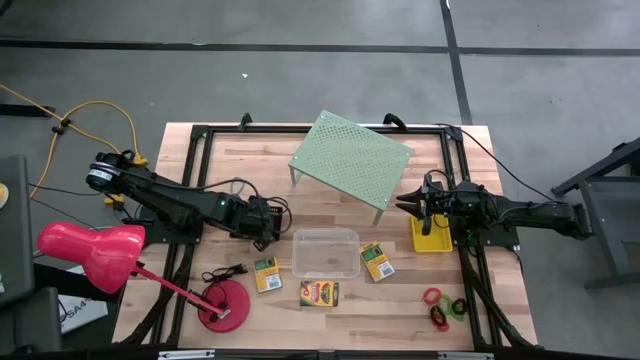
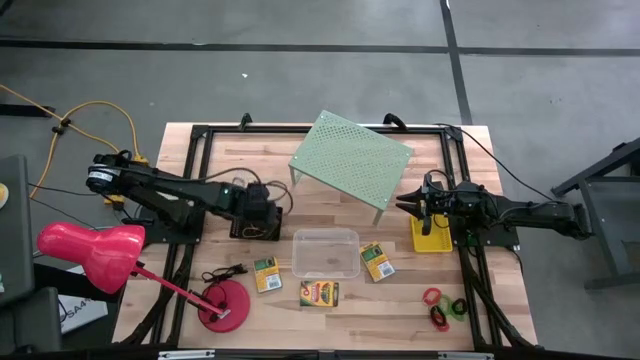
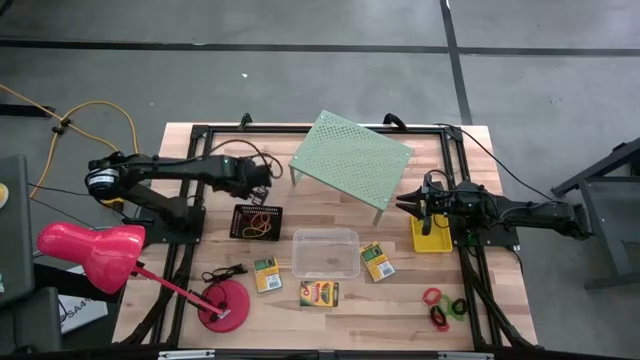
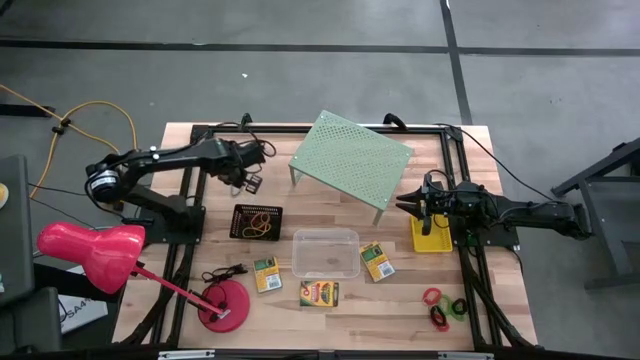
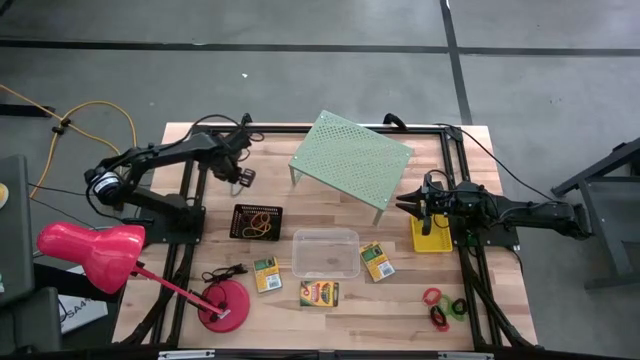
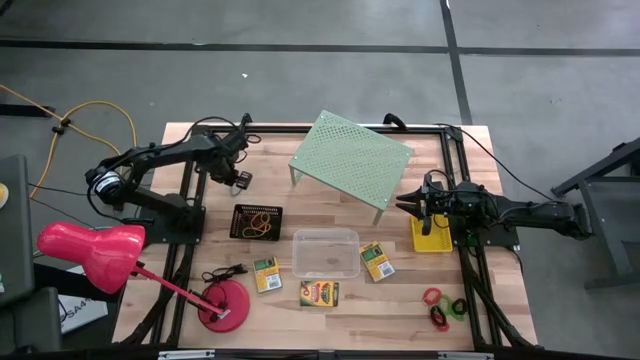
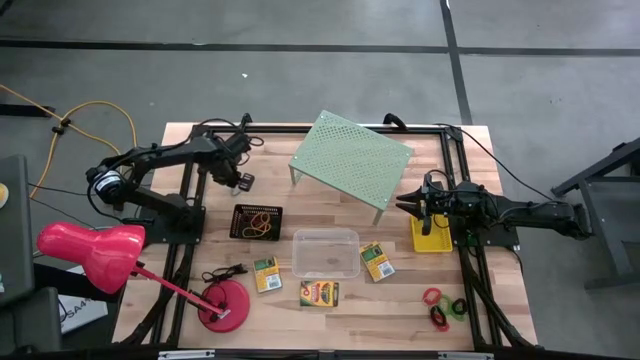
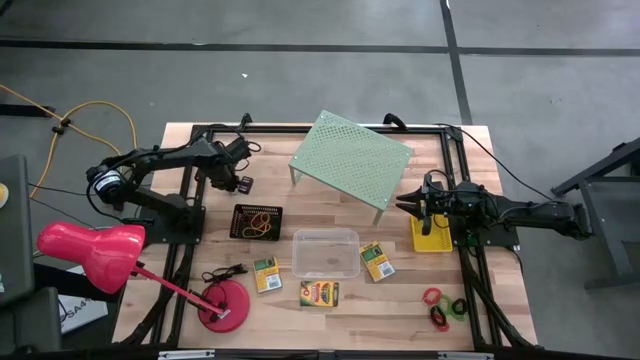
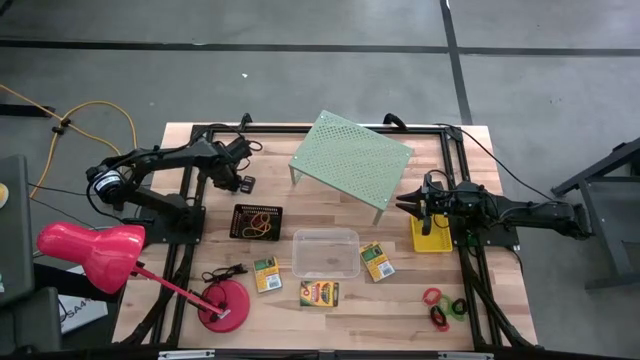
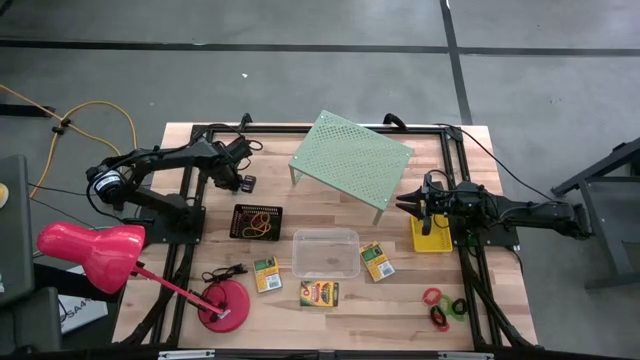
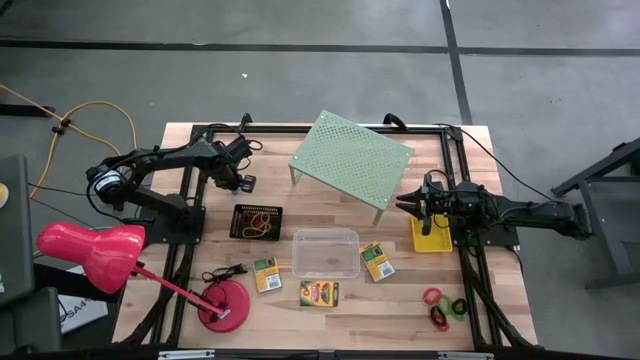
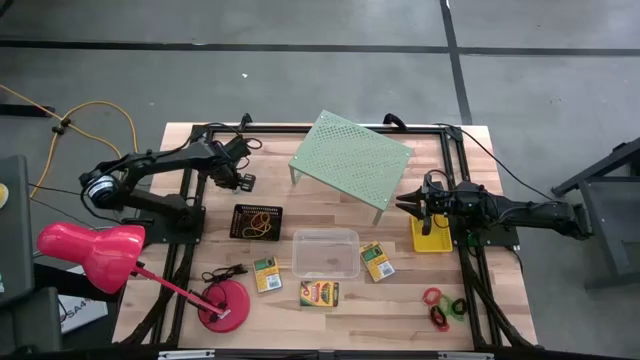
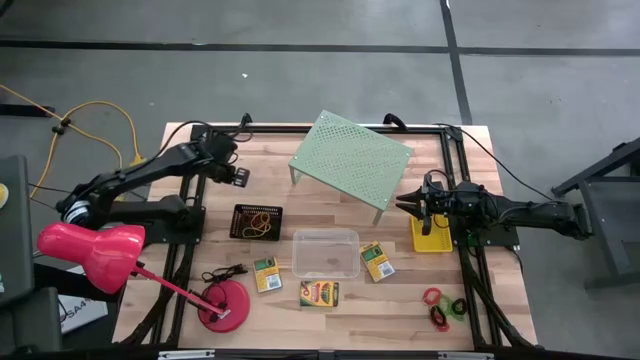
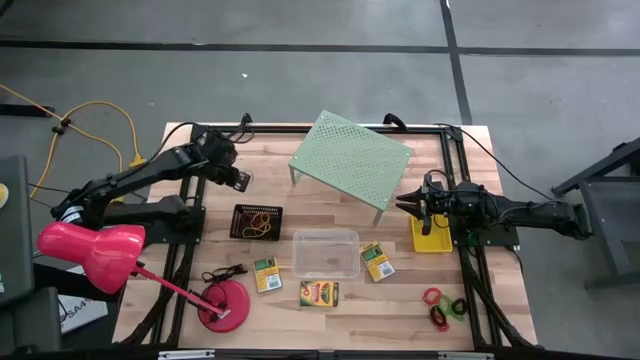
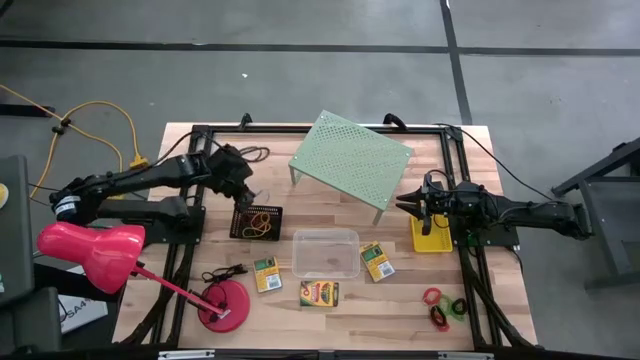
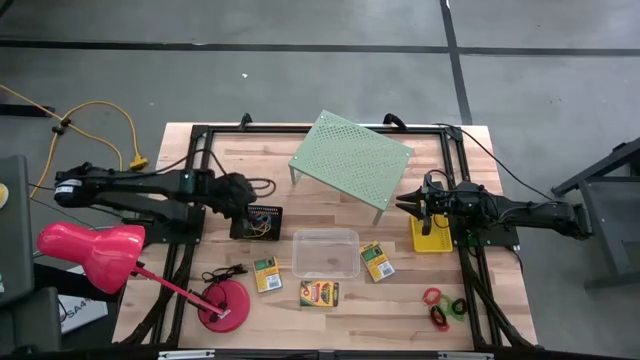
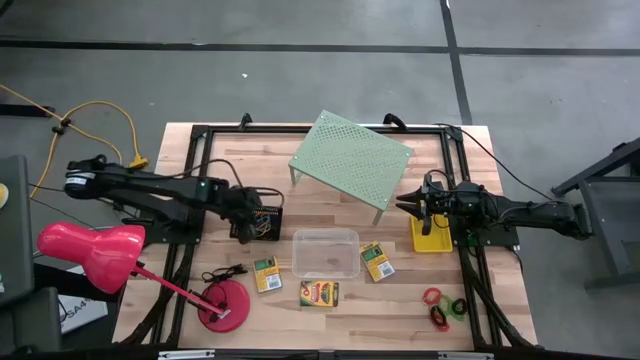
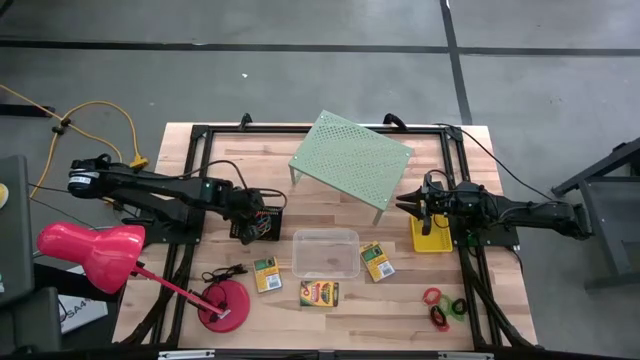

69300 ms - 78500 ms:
Task: Pick & Place Office Desk Supplies
Put the blue rubber band into the black bin

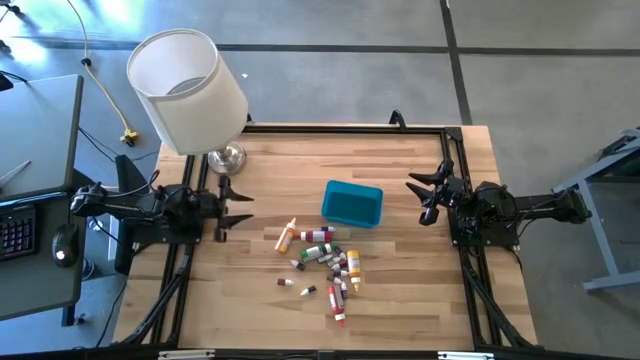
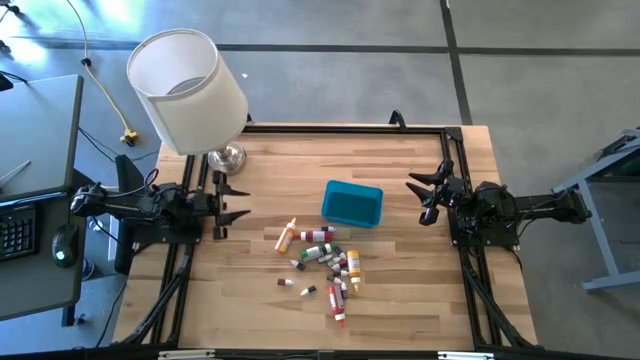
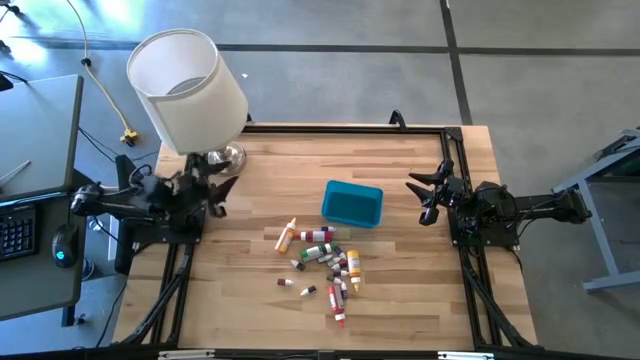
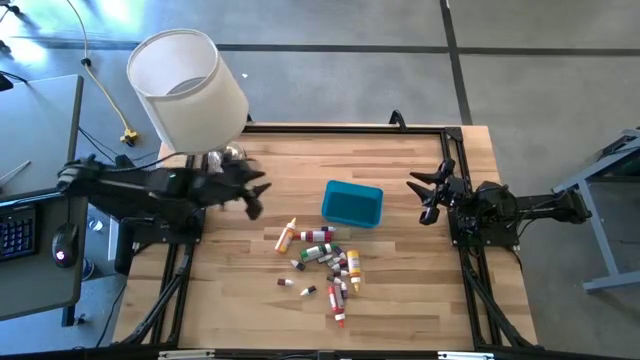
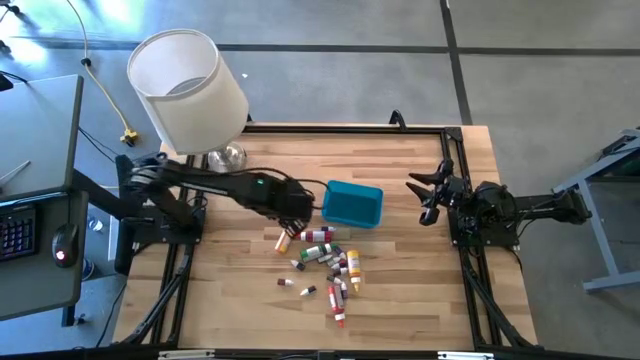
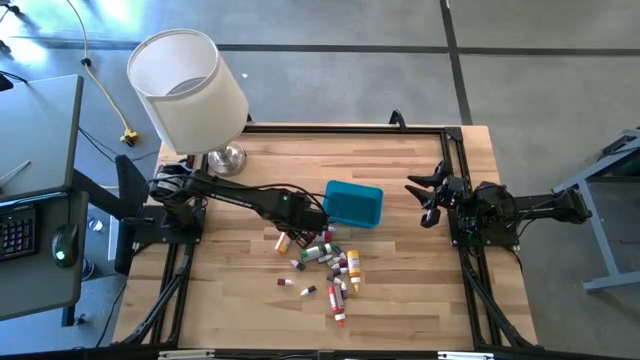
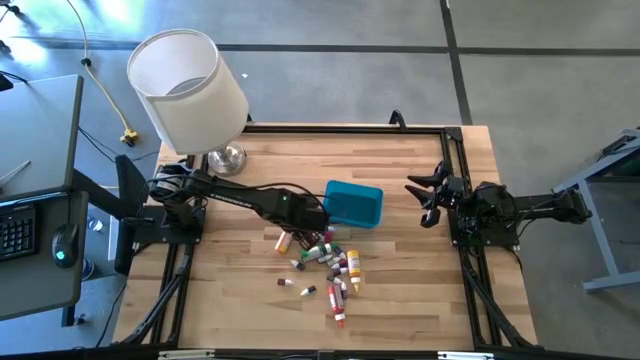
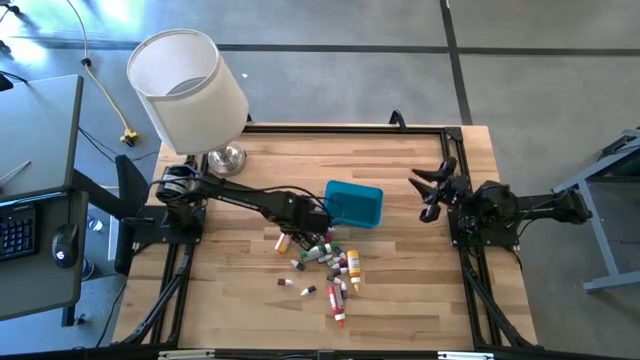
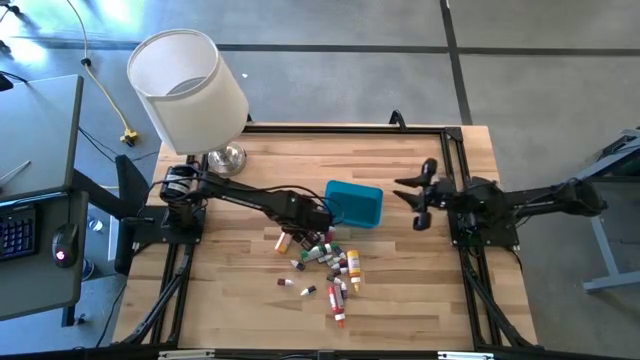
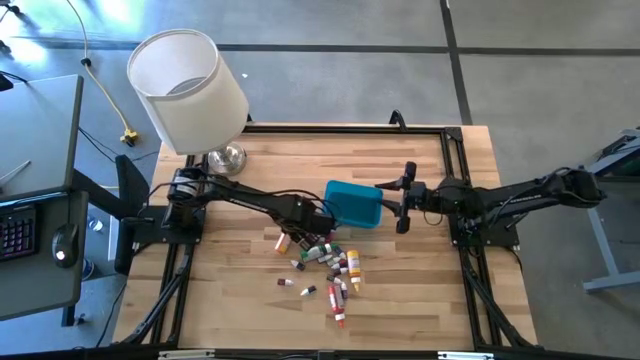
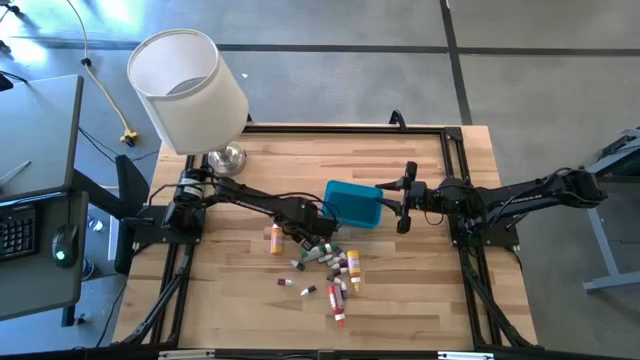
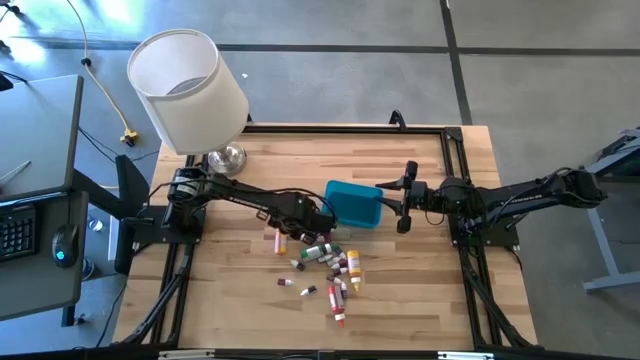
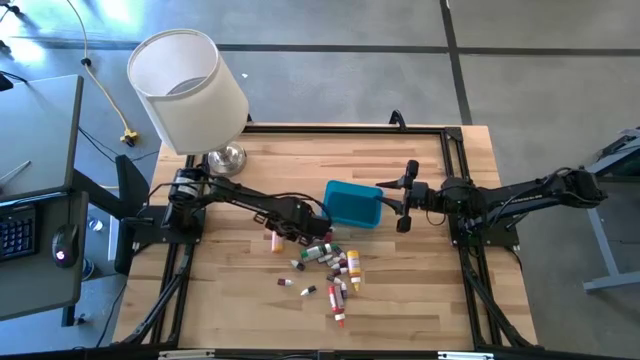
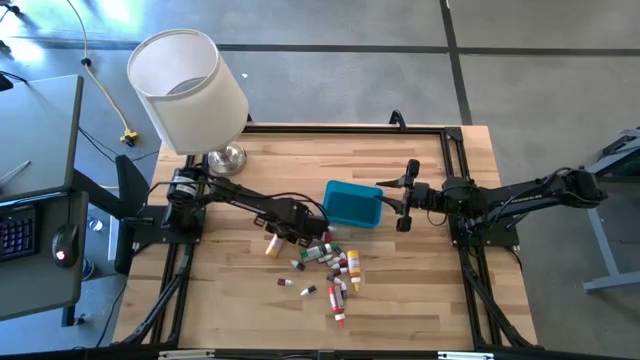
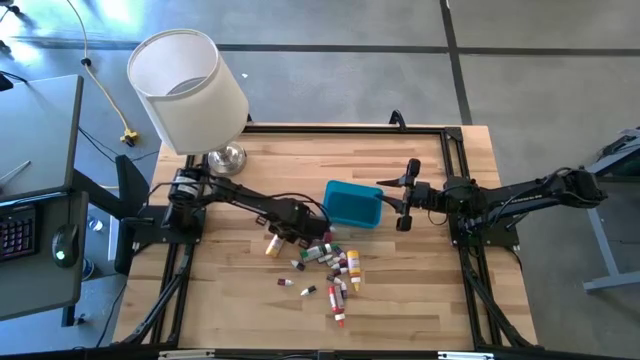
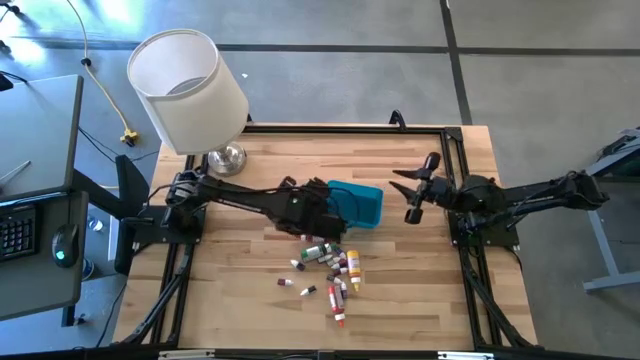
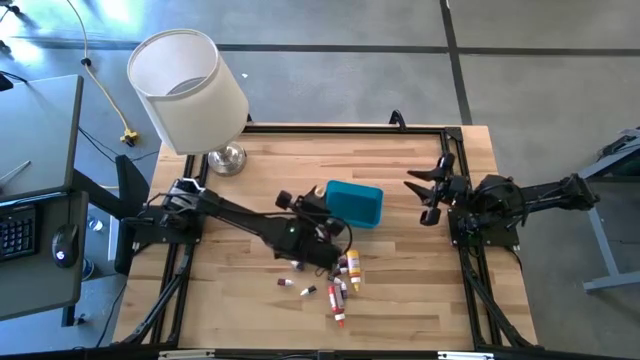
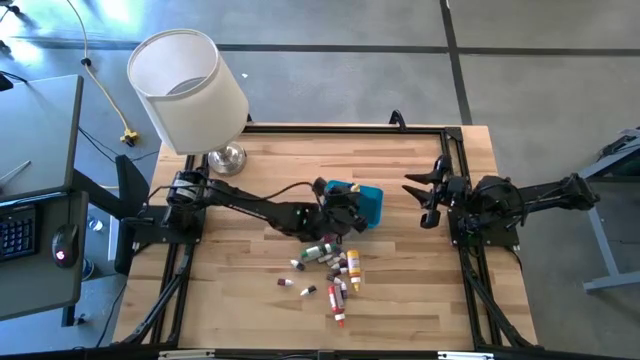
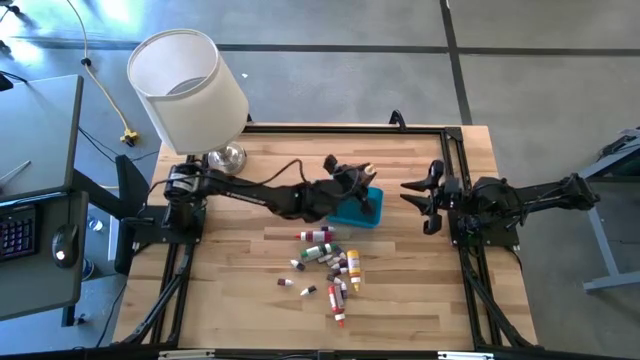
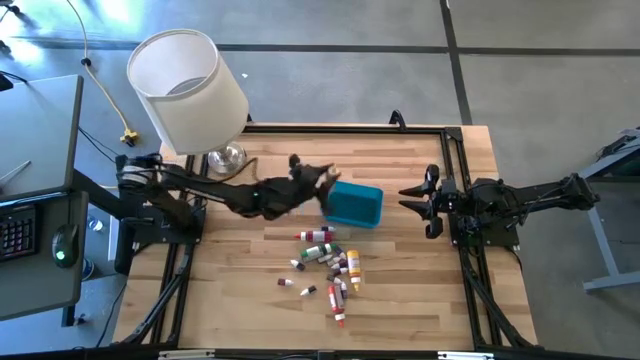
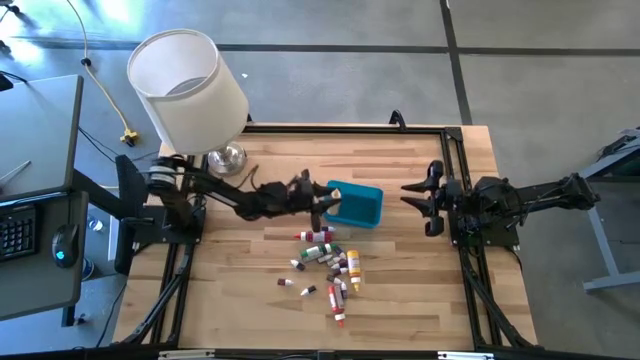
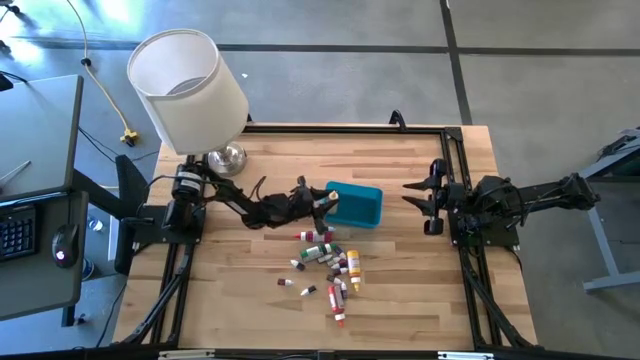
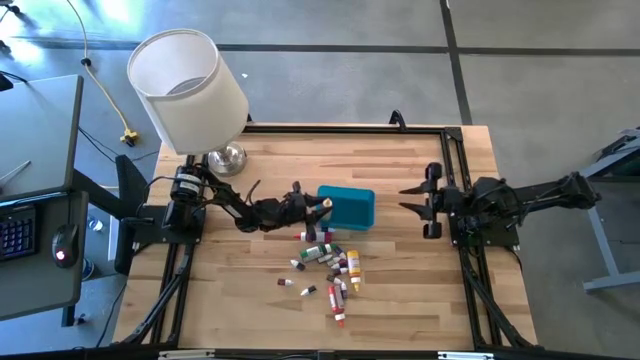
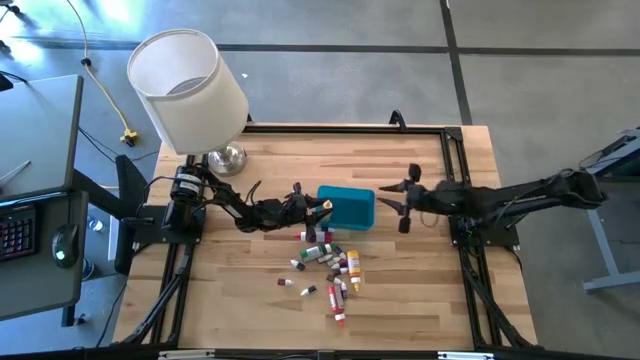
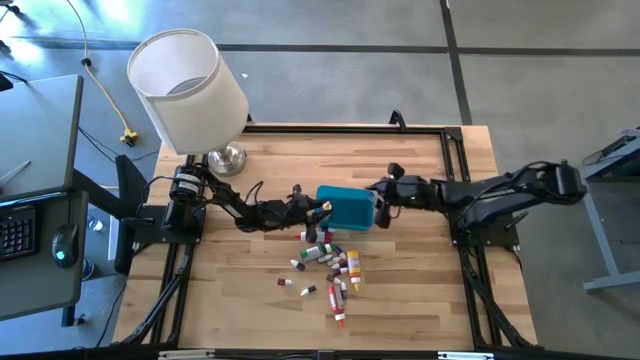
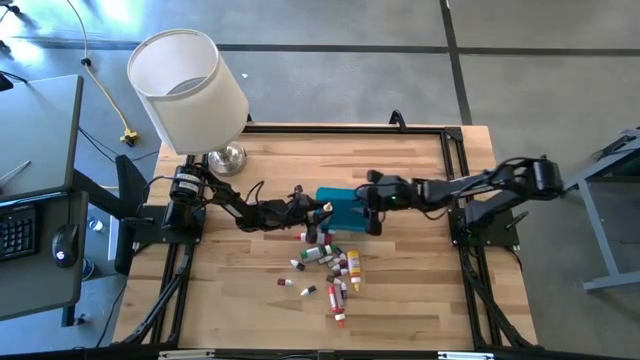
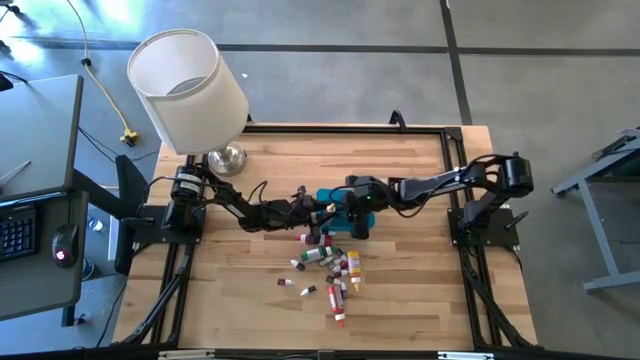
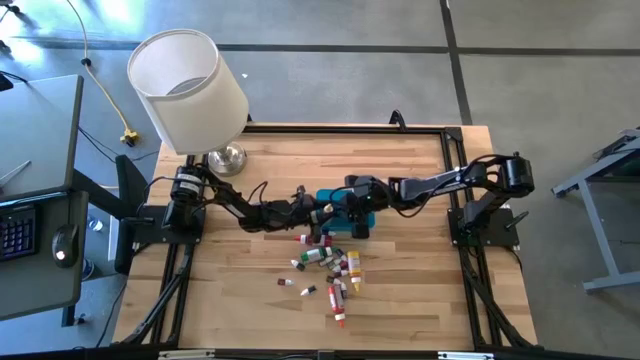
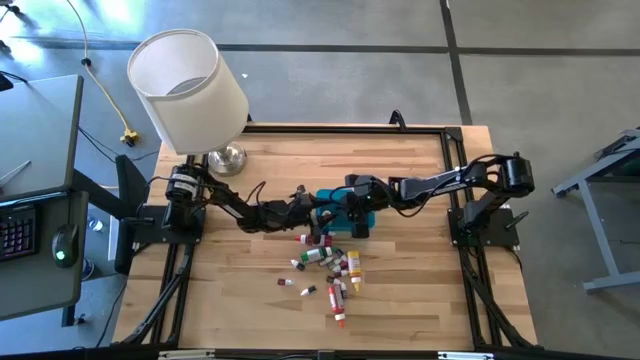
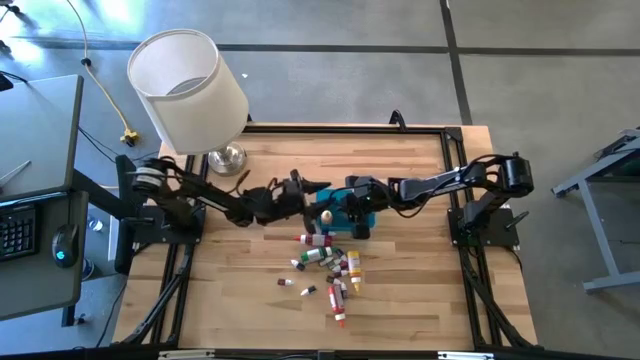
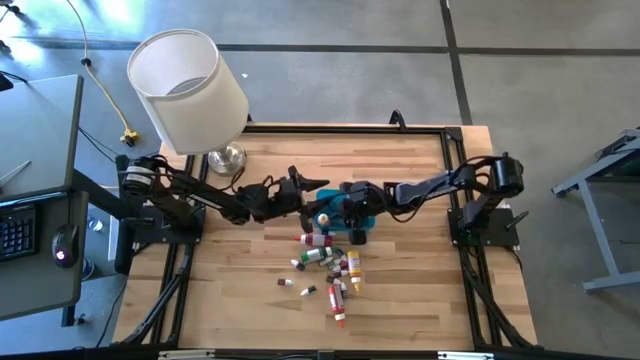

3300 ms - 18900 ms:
Task: Pick & Place food coloring
Put the left large yellow food coloring bottle into the bin
